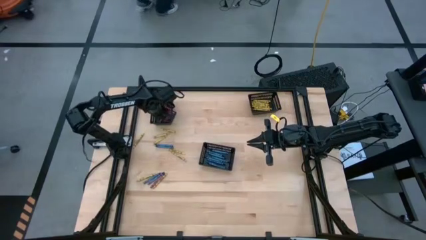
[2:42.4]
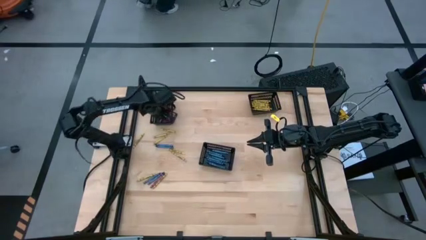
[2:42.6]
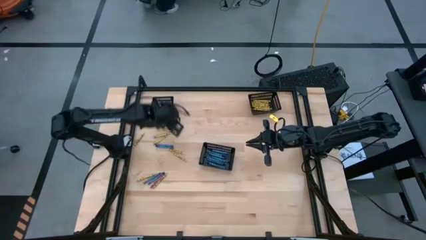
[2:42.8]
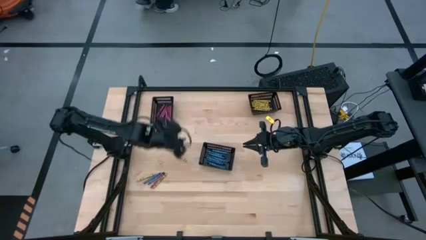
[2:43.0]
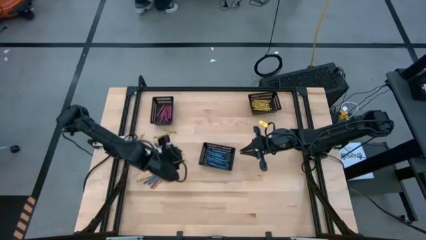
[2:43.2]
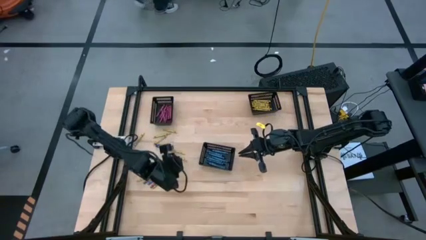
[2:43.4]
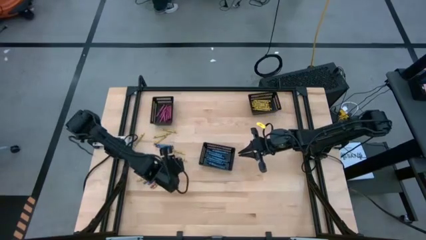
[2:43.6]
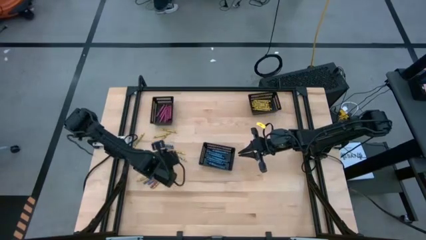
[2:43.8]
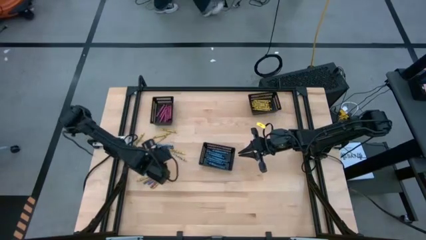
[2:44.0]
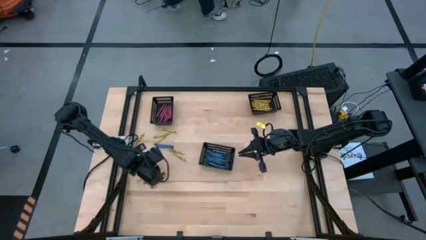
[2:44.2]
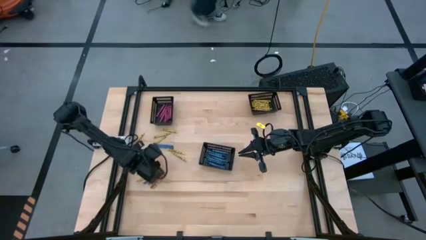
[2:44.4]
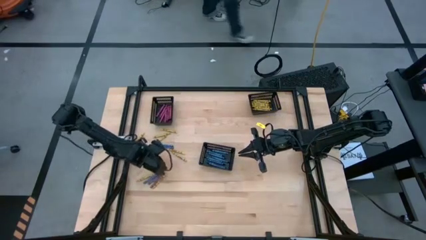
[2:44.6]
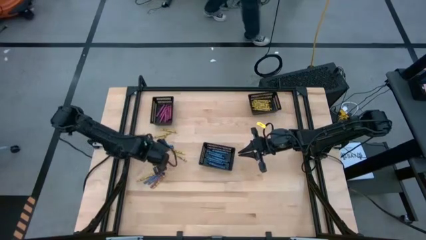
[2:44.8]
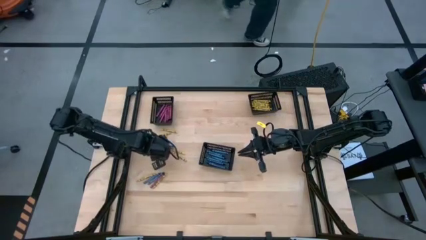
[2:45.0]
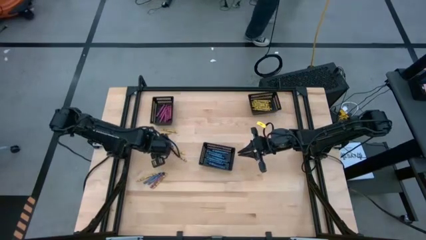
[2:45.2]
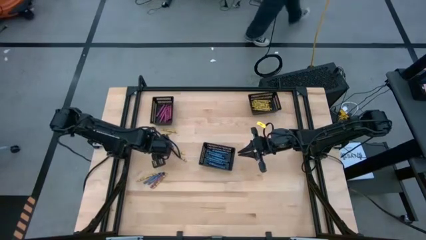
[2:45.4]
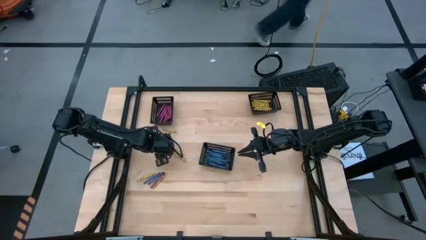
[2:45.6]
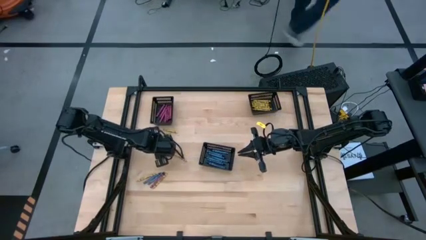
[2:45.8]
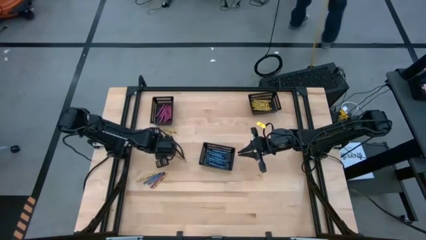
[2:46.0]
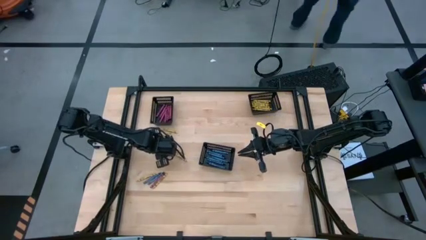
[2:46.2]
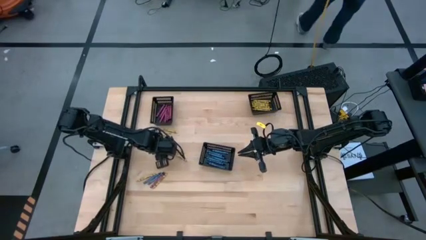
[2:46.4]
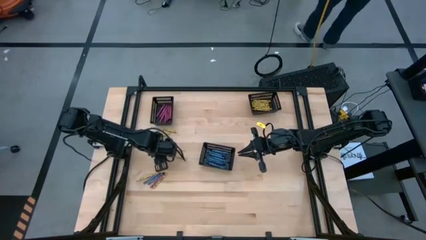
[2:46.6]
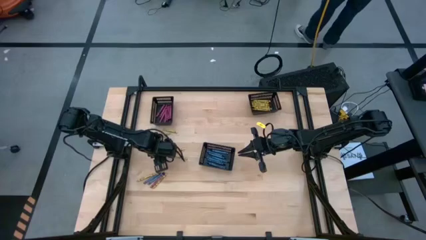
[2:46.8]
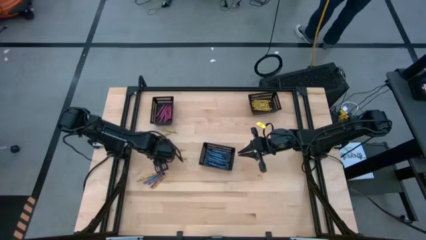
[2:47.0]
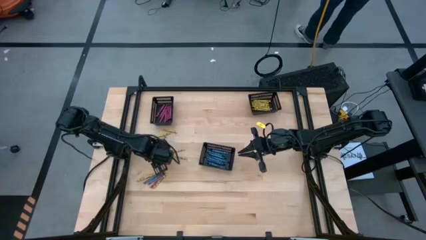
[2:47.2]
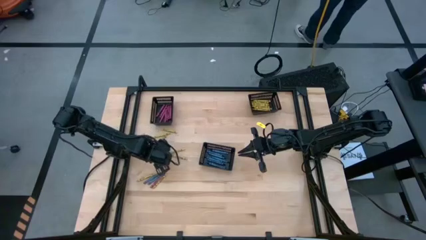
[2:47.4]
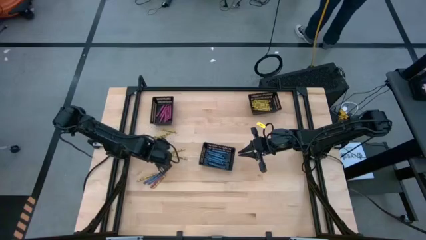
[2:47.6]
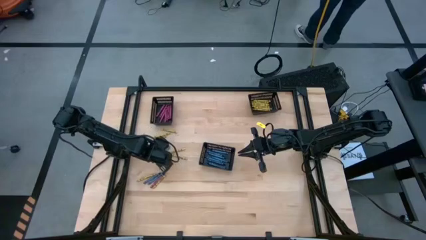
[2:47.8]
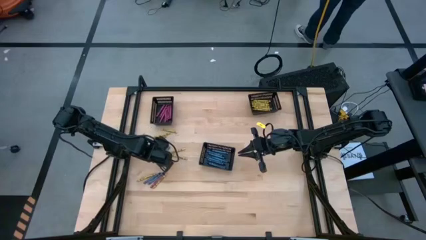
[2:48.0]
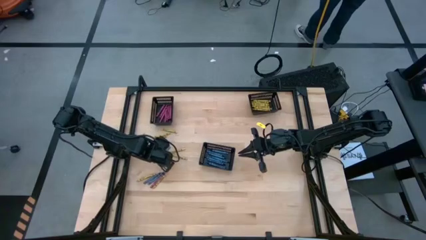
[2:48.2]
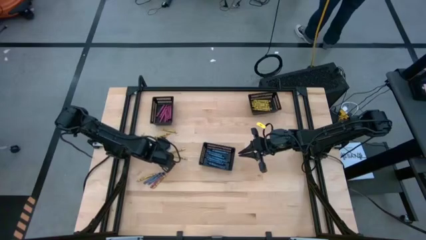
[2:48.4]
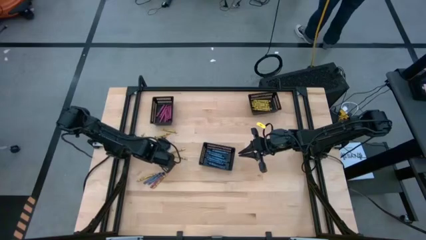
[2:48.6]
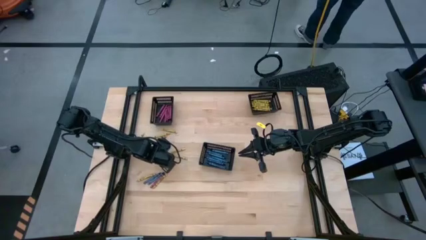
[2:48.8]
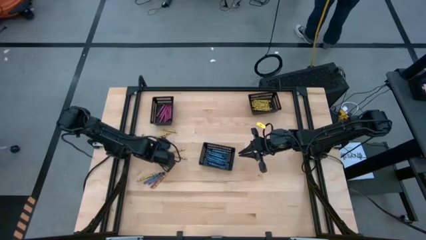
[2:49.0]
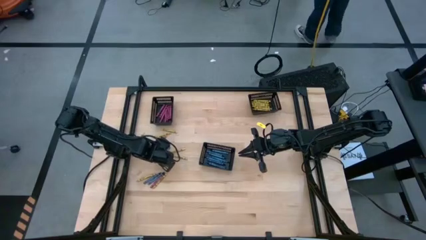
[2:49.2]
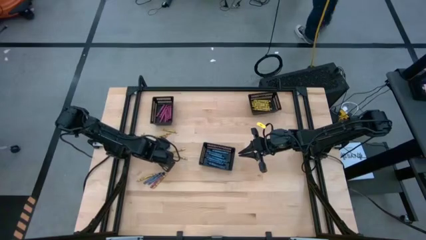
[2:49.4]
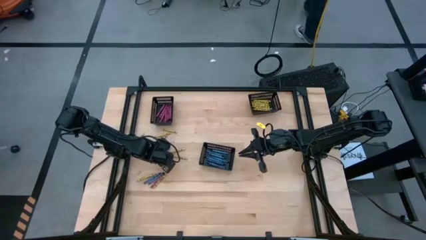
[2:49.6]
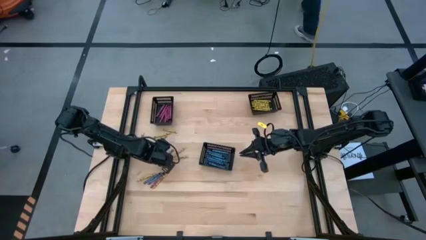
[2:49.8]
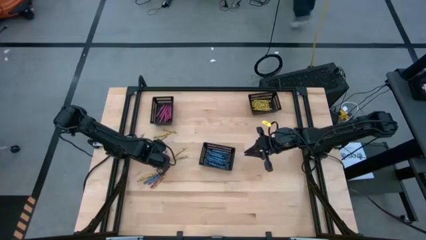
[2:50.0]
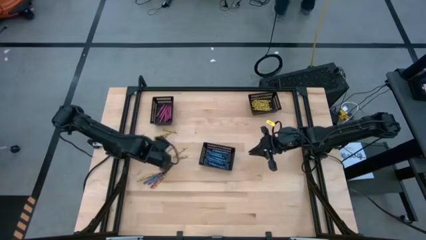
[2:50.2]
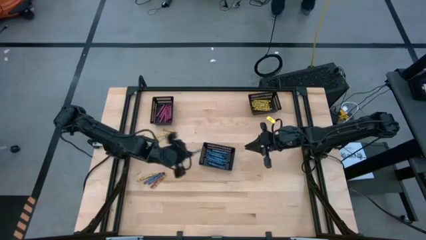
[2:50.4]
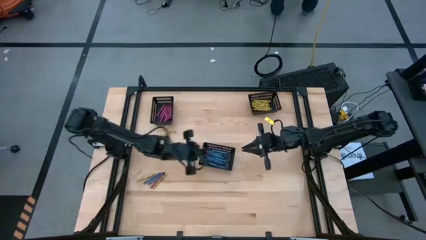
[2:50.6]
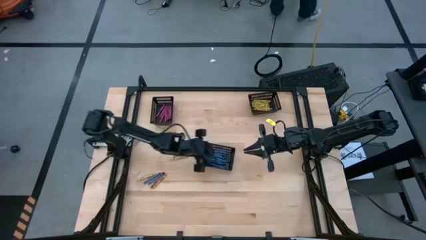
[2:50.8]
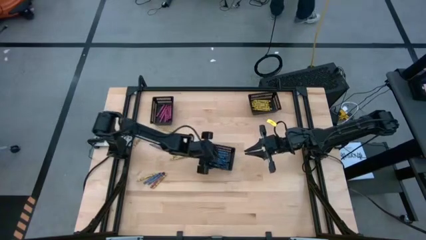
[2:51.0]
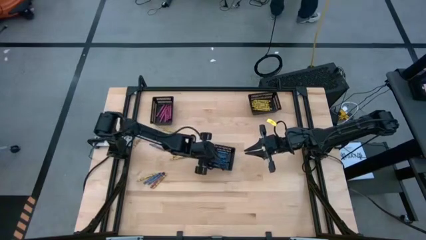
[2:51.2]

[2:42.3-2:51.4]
Task: Sort crayons
Put the blue crayon into the bottom black bin

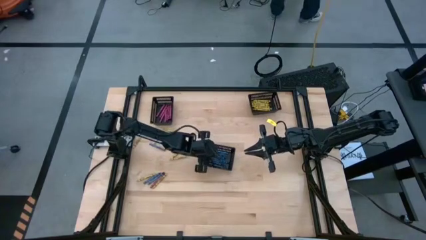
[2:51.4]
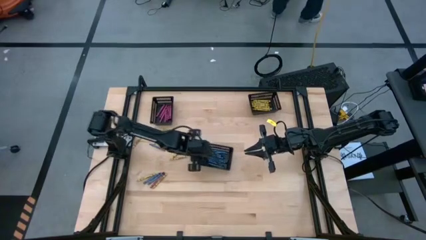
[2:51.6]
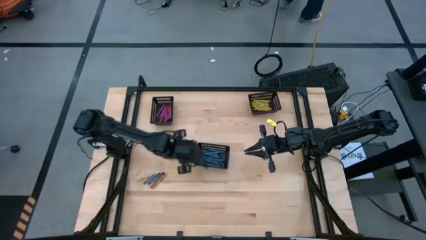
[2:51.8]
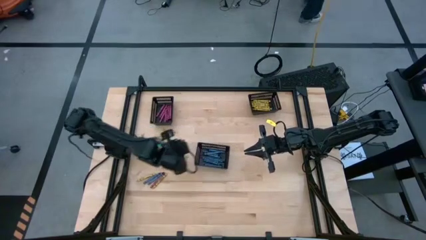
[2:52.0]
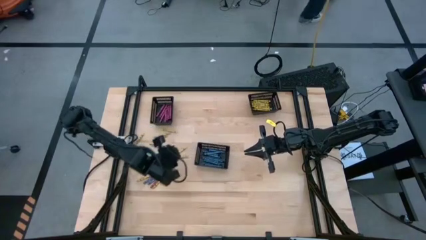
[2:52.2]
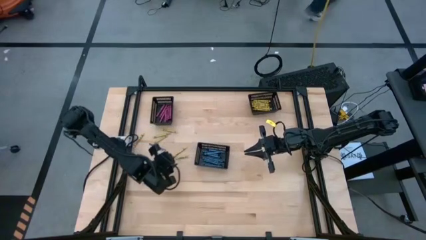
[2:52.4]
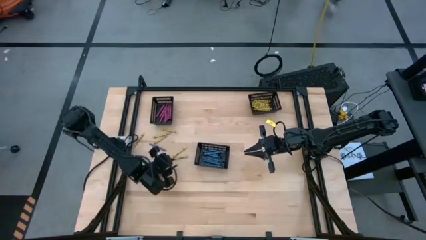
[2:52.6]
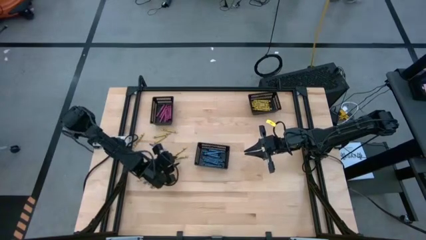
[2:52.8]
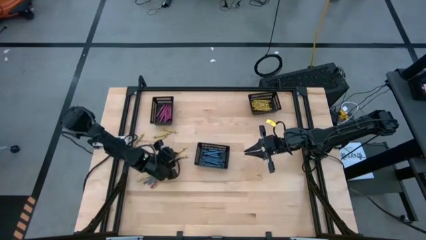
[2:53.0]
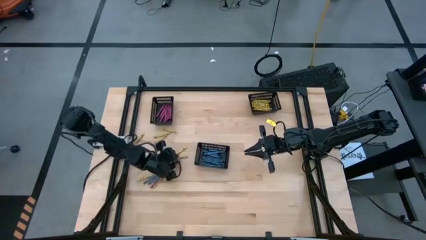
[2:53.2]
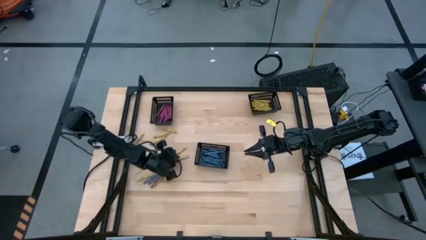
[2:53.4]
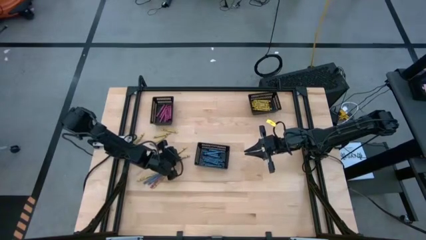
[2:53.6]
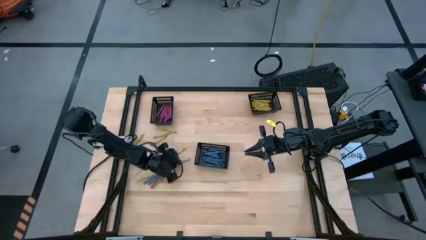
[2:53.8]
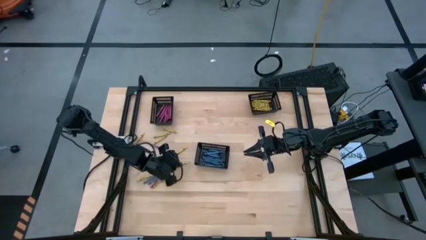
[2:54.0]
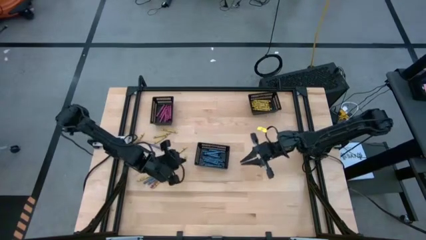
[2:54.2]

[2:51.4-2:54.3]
Put the yellow crayon into the top right black bin

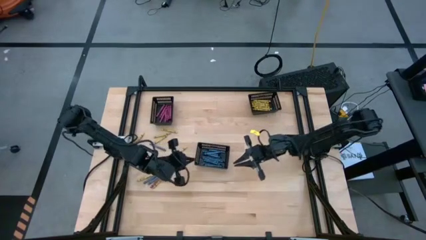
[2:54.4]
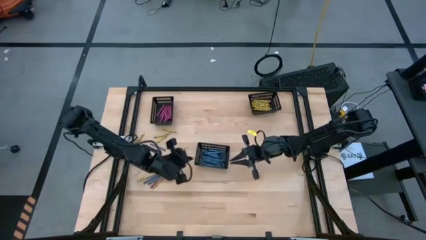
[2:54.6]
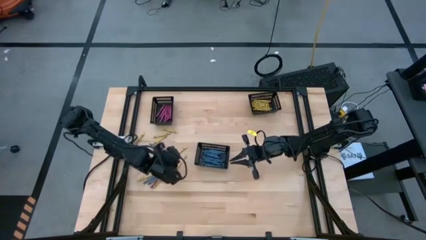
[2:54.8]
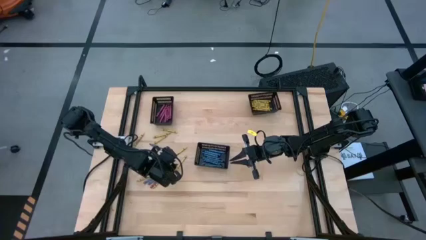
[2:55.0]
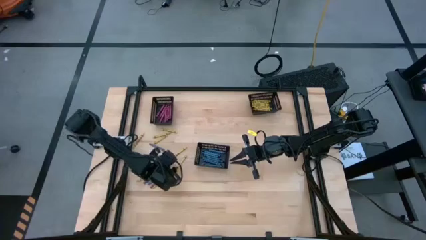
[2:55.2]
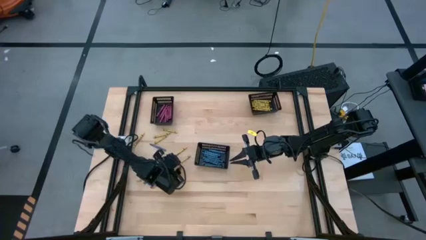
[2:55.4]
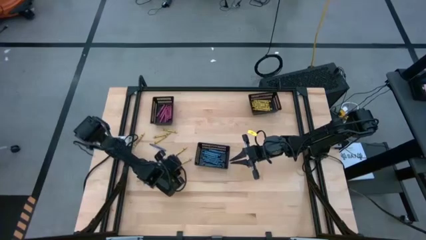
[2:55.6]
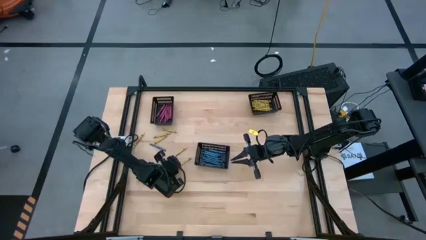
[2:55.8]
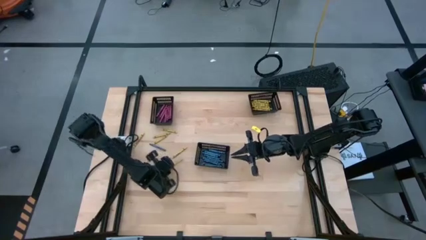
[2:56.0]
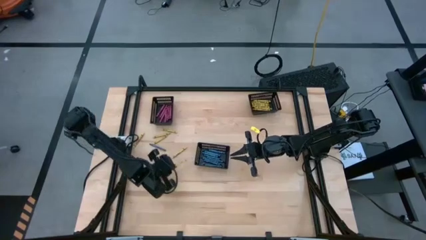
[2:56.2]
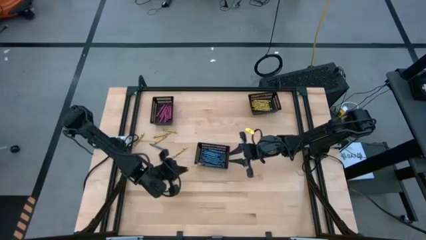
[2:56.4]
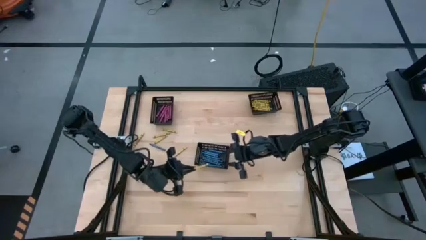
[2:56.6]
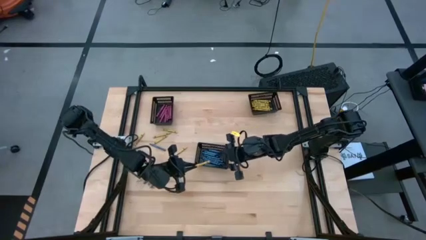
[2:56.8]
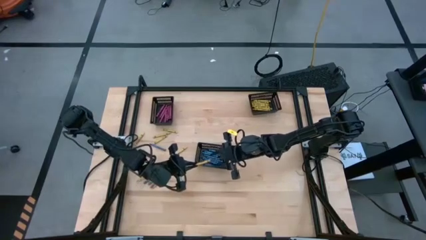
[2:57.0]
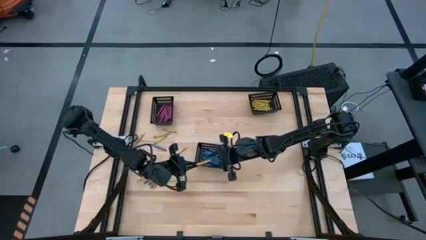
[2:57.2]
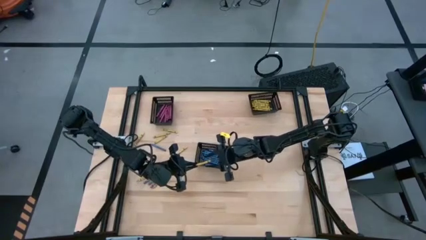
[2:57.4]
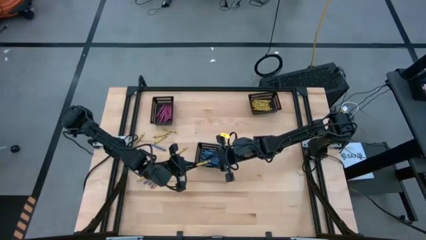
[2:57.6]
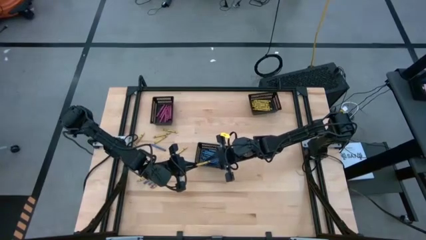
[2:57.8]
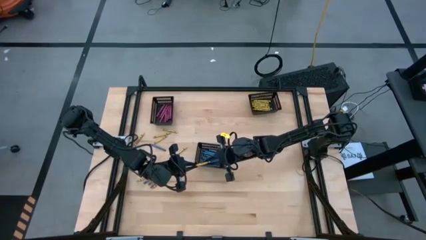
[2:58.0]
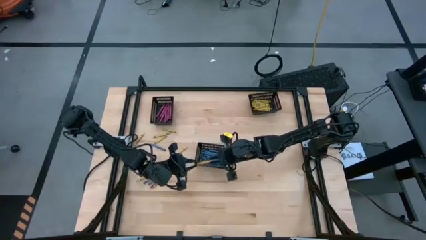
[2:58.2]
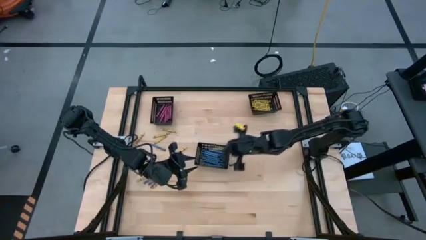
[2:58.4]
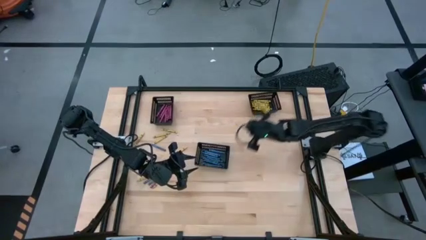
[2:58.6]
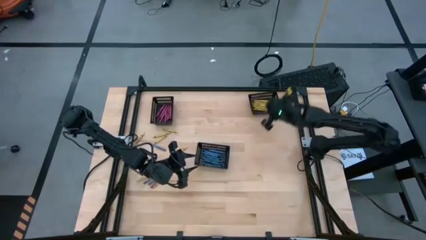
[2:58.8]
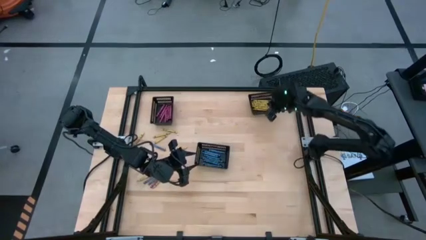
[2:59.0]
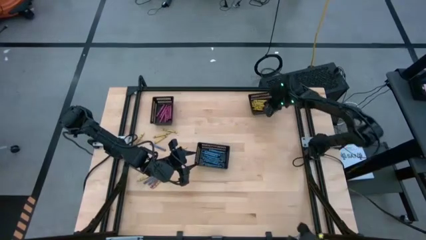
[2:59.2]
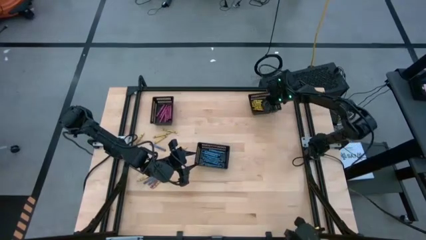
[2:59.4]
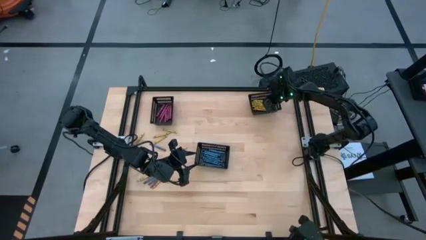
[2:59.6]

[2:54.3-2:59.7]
Put the yellow crayon into the top right black bin
